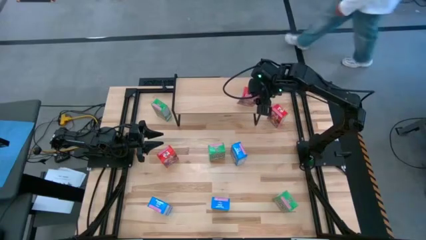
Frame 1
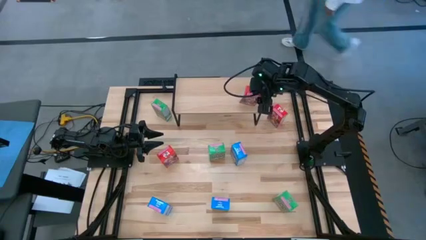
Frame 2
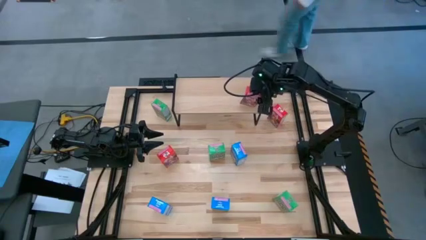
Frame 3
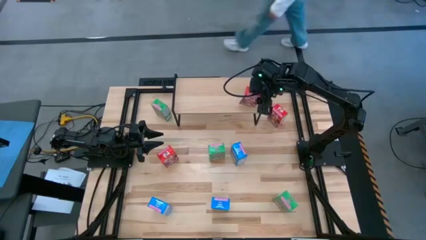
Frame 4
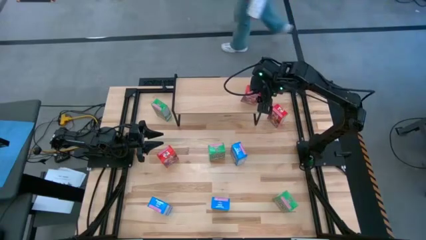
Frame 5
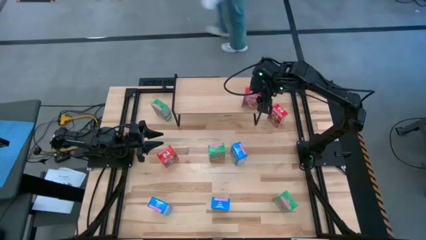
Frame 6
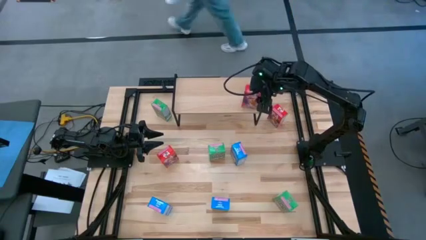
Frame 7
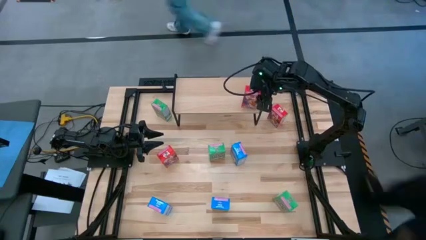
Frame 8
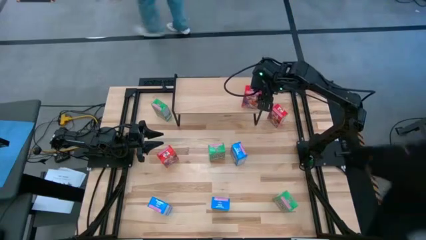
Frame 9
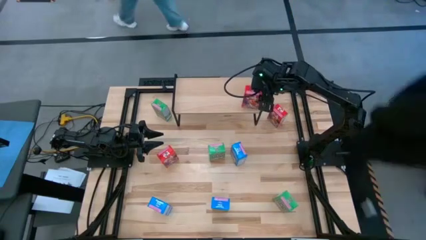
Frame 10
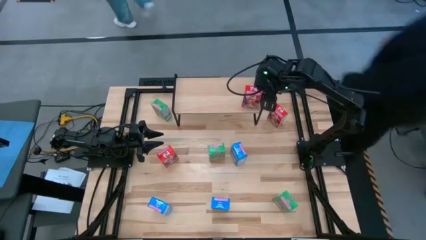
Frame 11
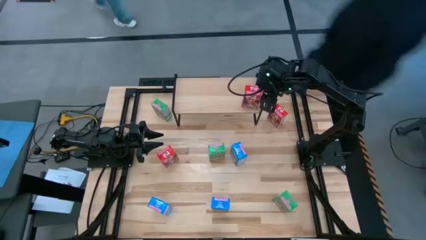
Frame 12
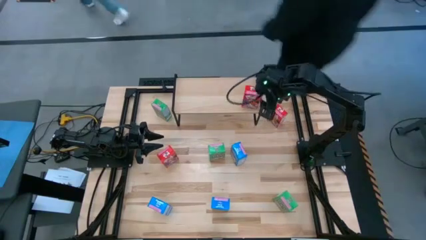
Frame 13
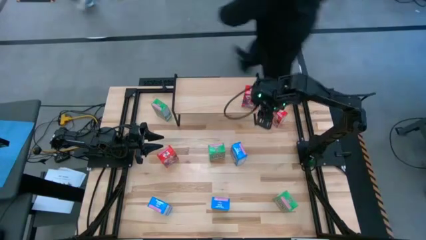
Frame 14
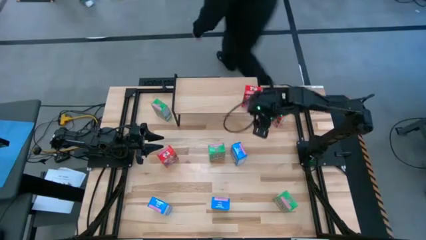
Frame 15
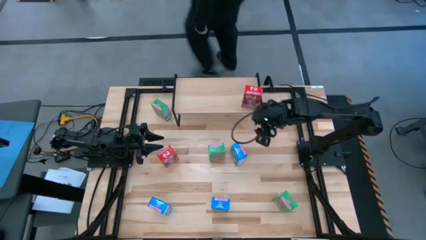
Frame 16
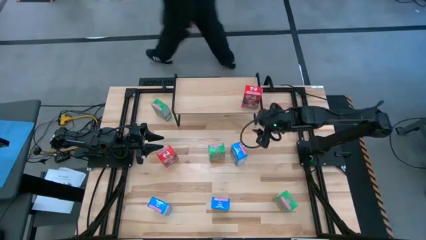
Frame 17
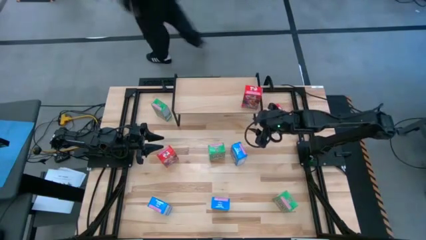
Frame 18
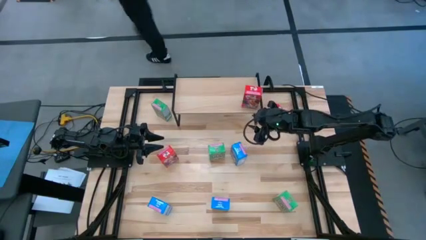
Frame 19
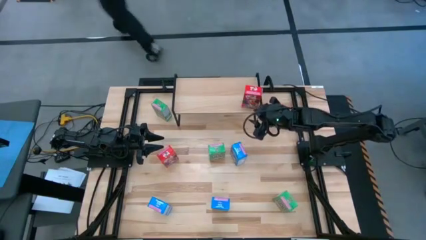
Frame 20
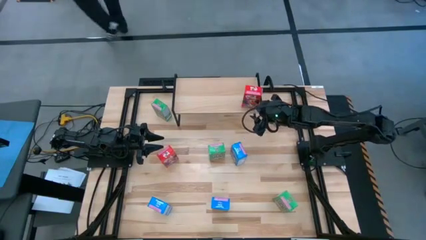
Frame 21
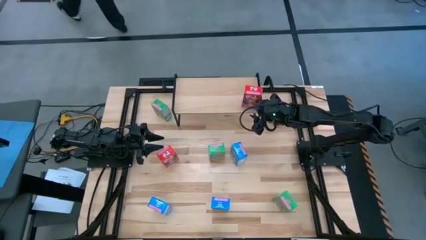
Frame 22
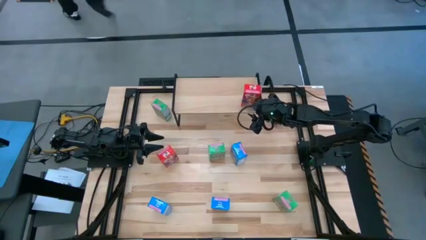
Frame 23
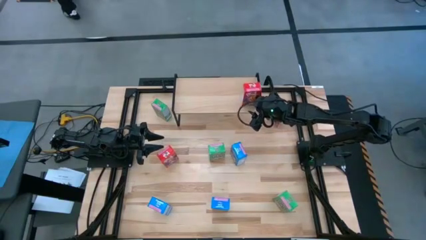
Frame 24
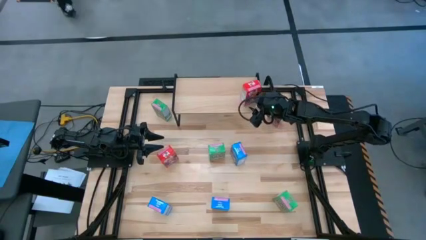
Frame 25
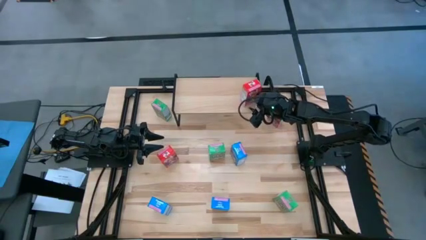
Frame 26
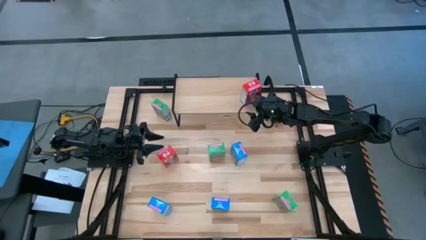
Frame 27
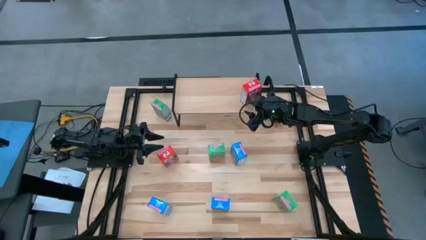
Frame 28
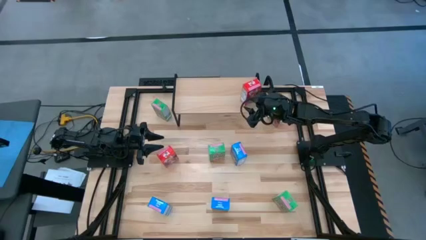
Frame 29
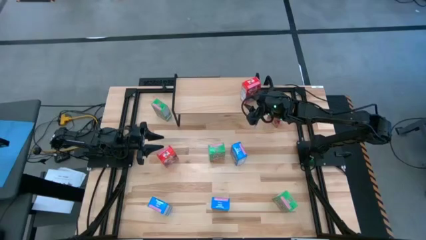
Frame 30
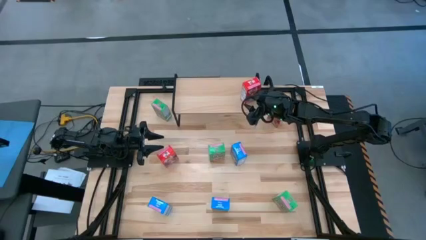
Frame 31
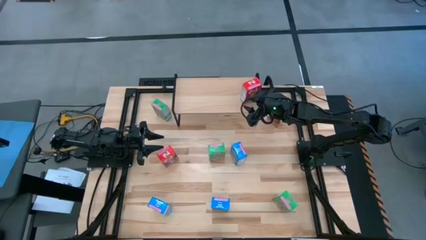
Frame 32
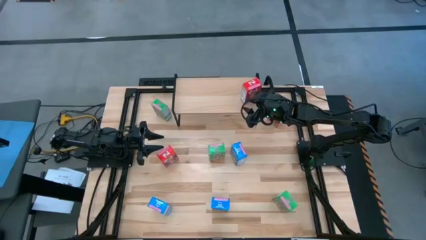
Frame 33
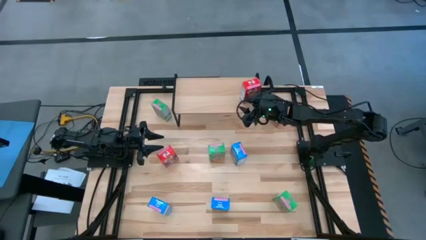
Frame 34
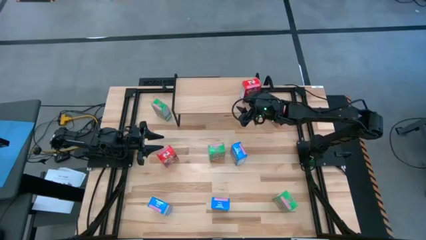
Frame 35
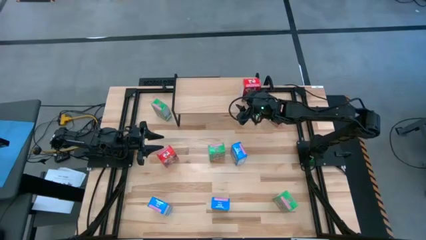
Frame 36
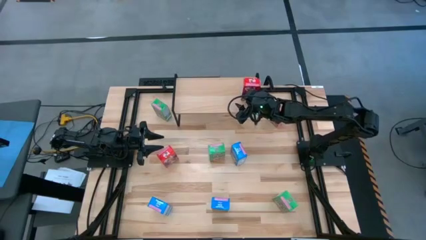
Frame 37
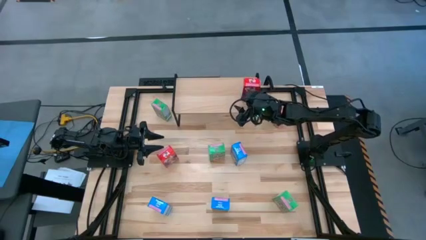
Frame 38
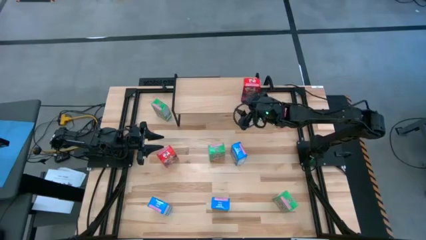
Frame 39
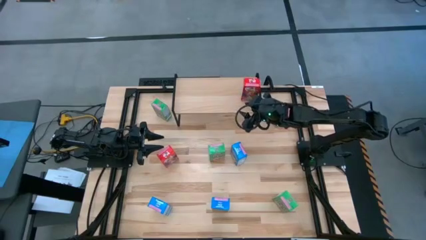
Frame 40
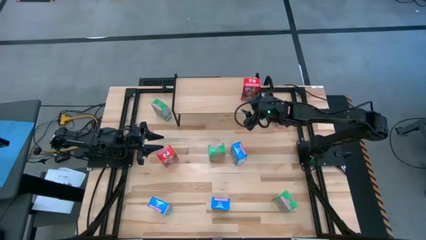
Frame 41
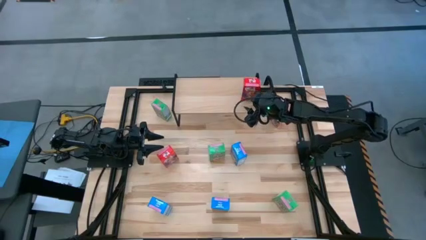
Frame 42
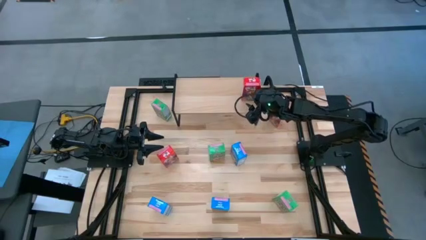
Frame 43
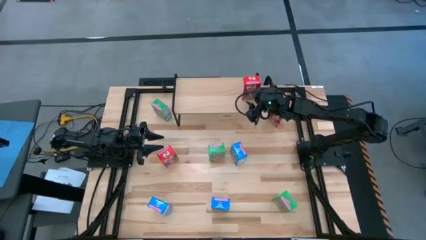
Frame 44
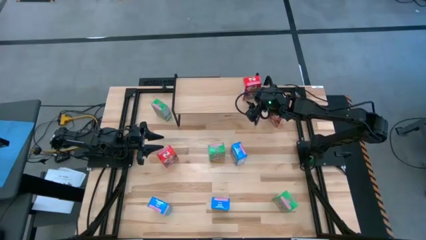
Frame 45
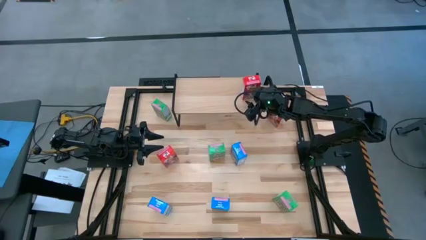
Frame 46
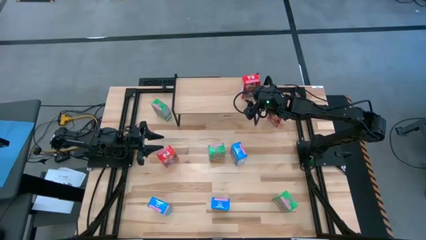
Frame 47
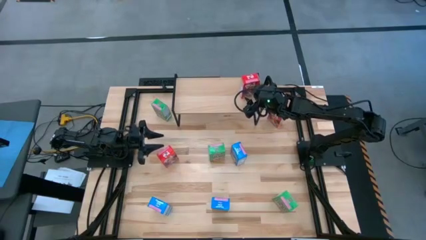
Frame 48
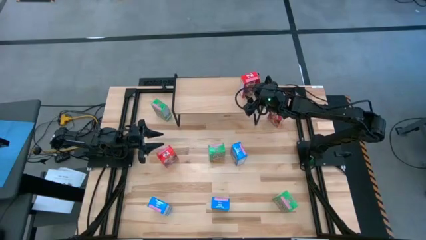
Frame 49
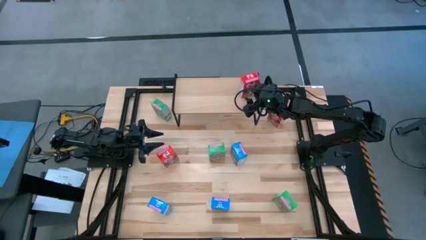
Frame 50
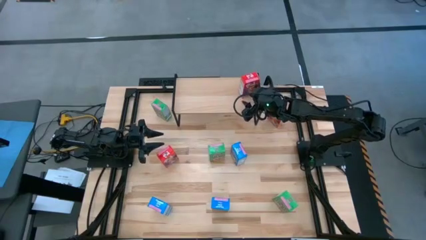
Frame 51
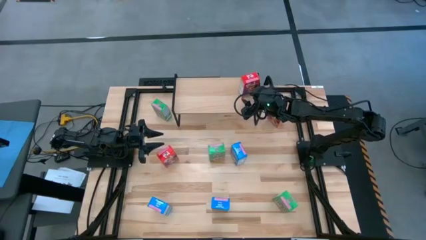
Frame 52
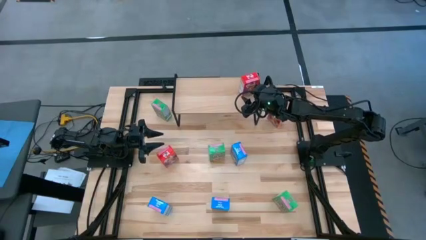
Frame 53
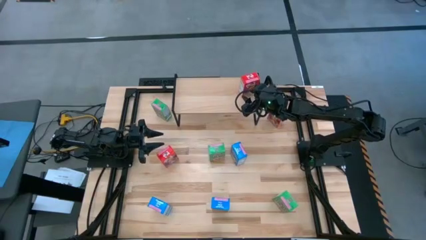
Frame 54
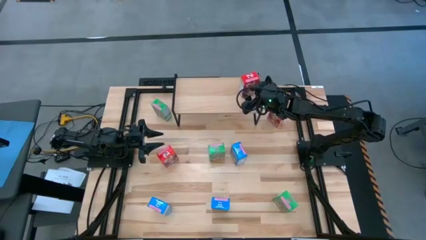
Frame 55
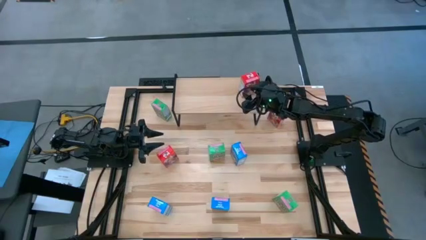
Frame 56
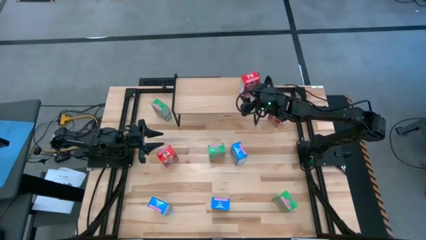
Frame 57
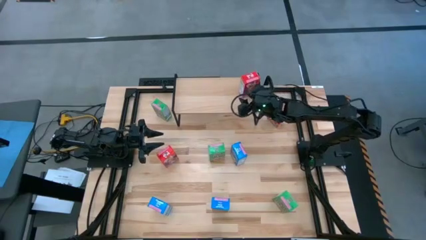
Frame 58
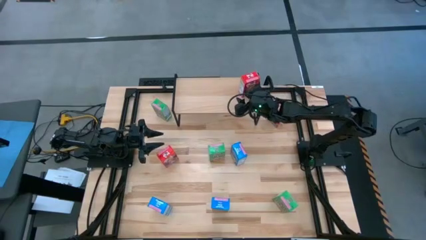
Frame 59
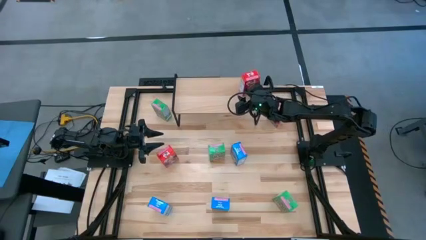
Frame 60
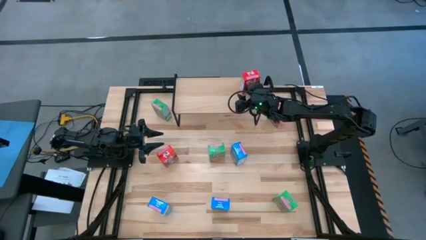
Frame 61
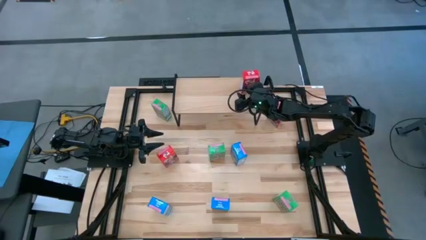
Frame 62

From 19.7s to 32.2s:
Task: Stack cereal on shelf
Put the bottom right red cereal box on the shelf

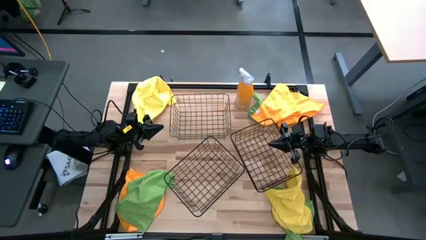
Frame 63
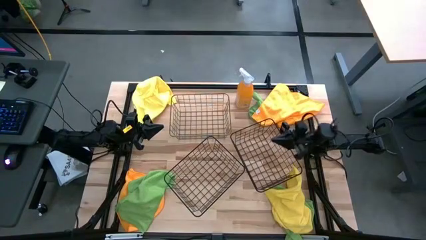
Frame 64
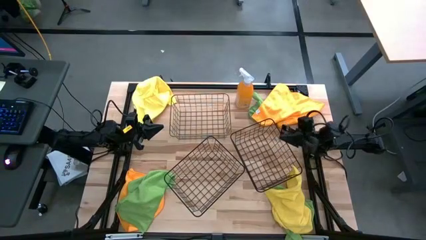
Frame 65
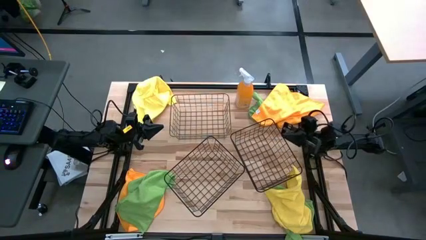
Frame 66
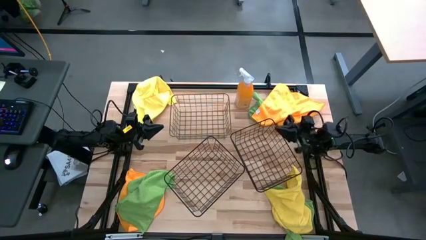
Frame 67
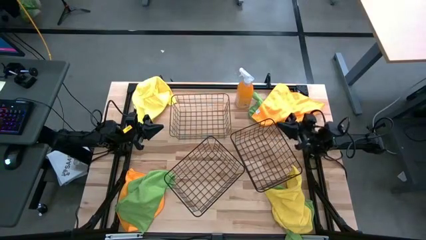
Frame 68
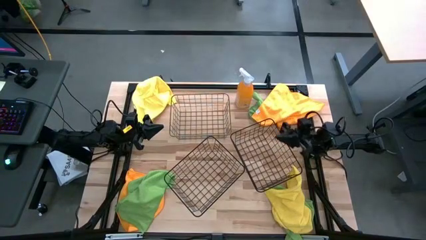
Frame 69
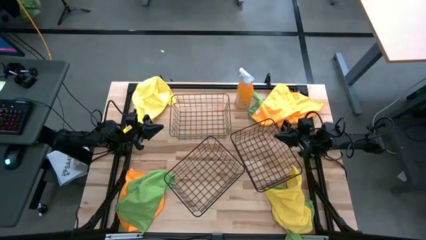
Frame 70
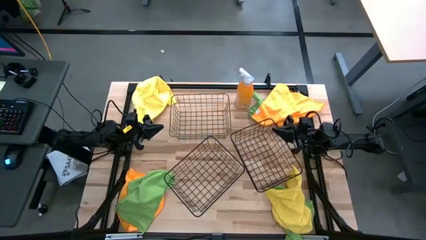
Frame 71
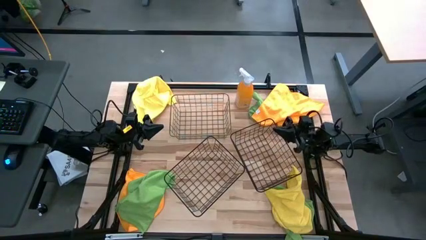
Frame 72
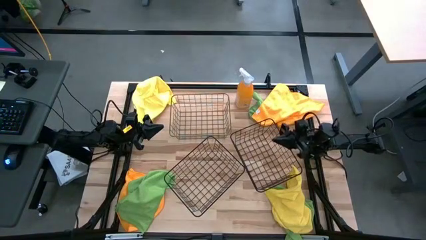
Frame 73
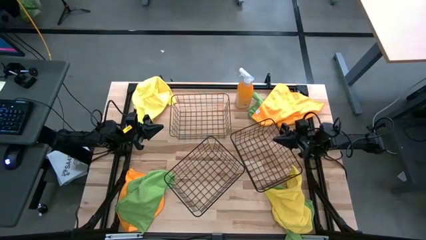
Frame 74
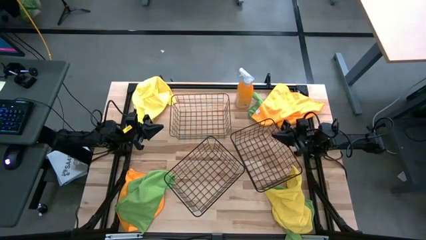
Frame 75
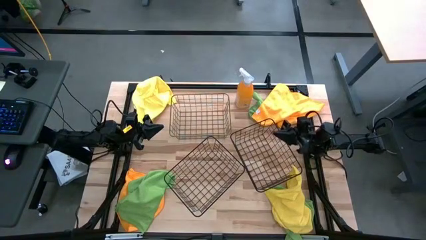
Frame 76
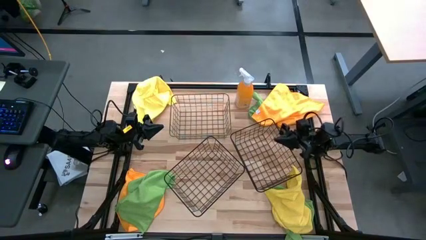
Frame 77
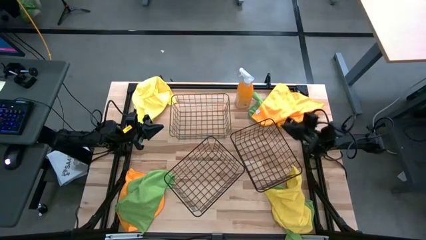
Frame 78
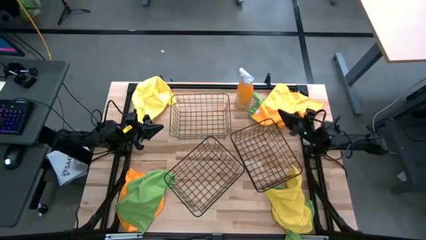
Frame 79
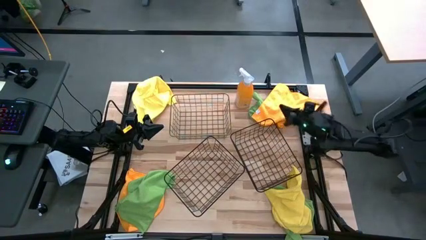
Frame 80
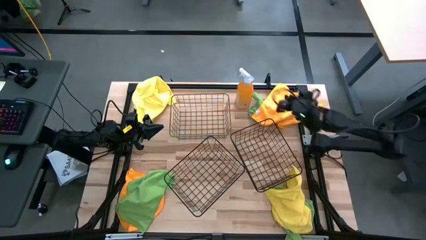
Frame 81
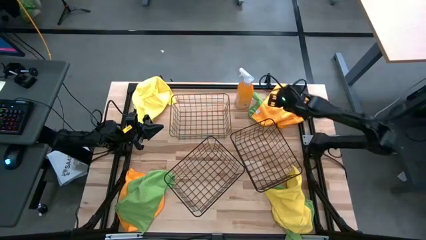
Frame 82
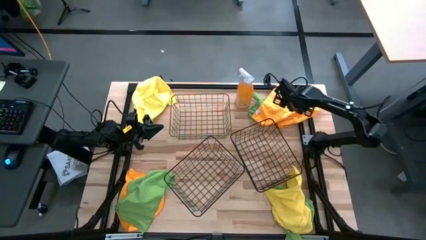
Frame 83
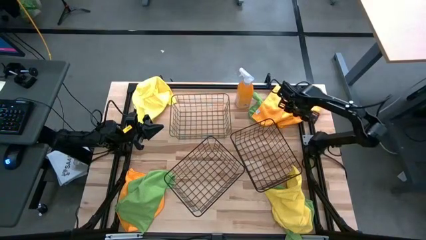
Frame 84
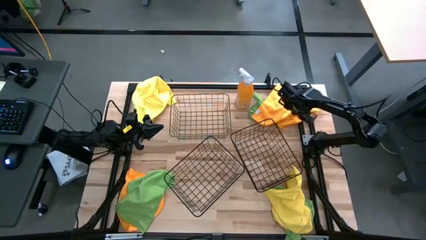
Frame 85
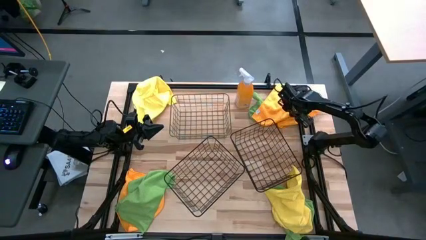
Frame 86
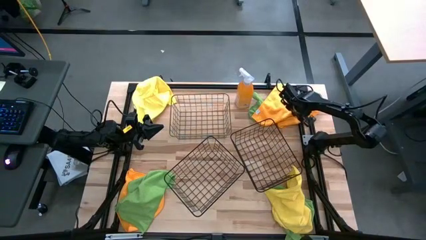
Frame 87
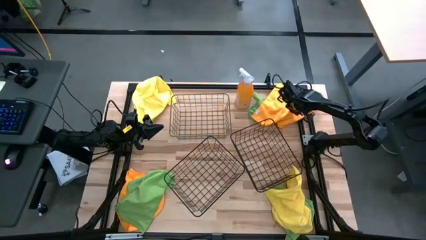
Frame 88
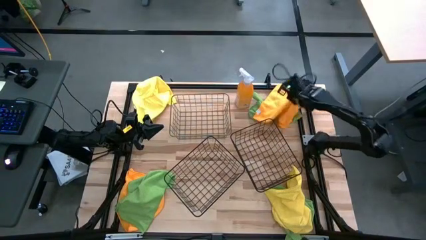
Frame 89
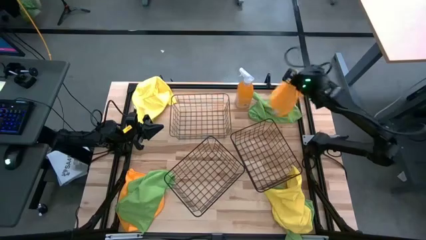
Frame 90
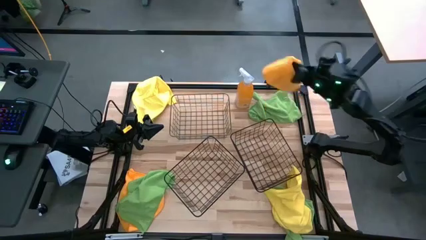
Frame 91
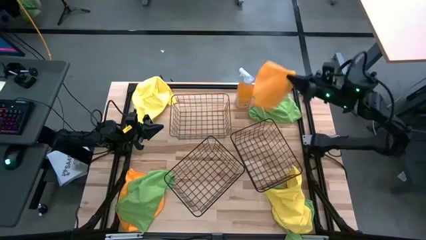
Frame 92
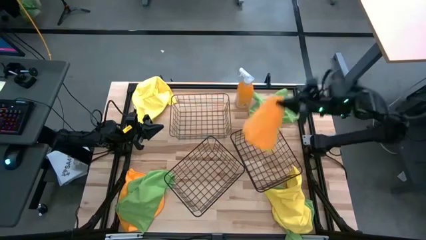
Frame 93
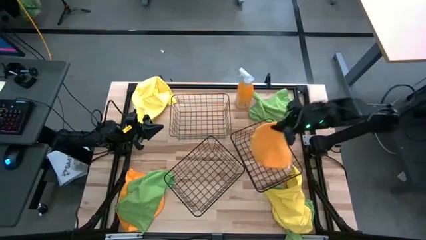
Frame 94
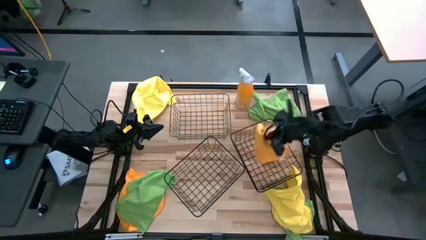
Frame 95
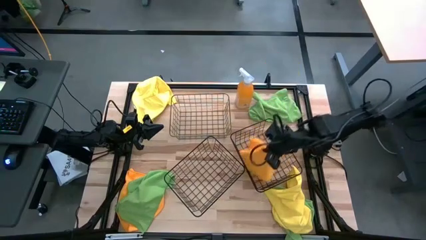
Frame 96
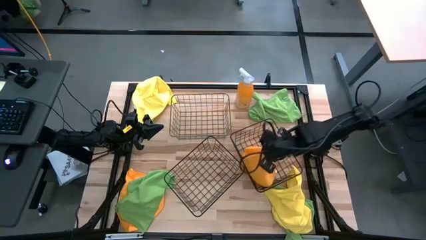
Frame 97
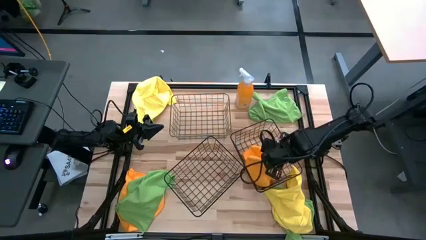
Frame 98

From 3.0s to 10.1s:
Task: Sort microfiber towel by color & place in baskets
Put the top orange microfiber cloth into the right wire basket
